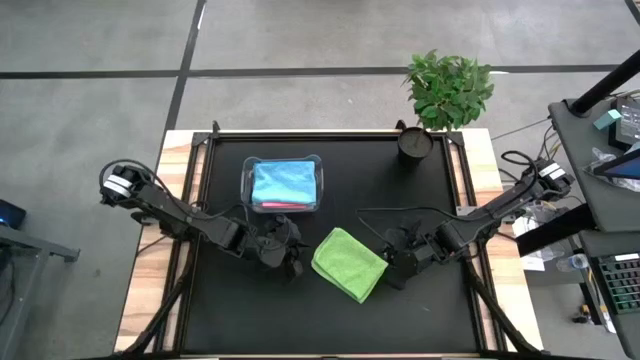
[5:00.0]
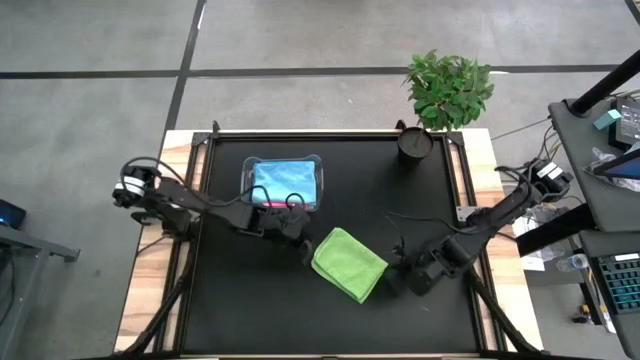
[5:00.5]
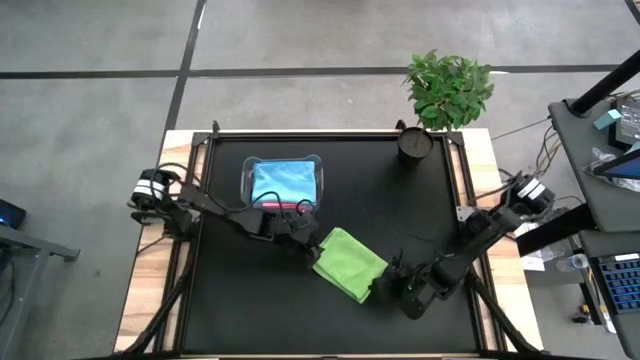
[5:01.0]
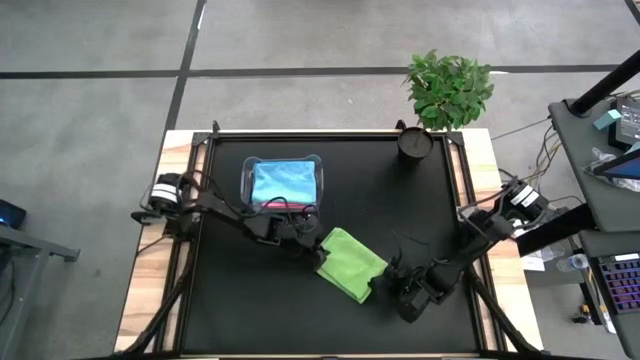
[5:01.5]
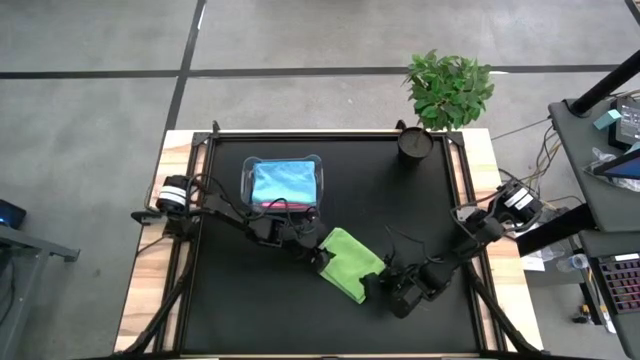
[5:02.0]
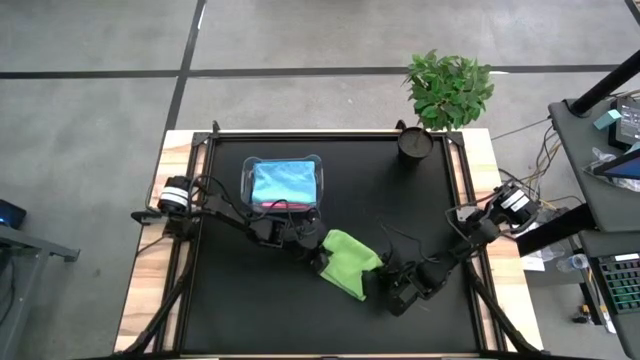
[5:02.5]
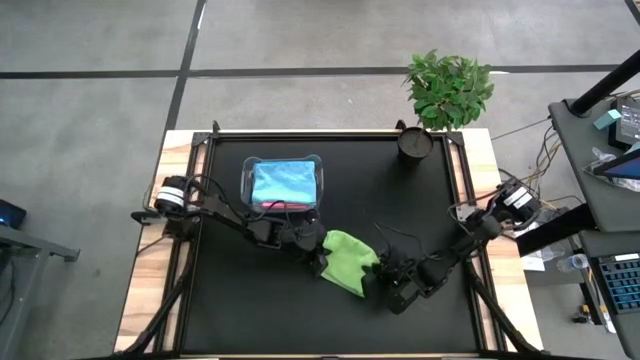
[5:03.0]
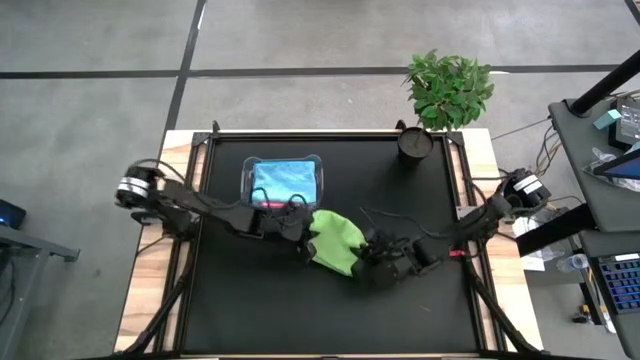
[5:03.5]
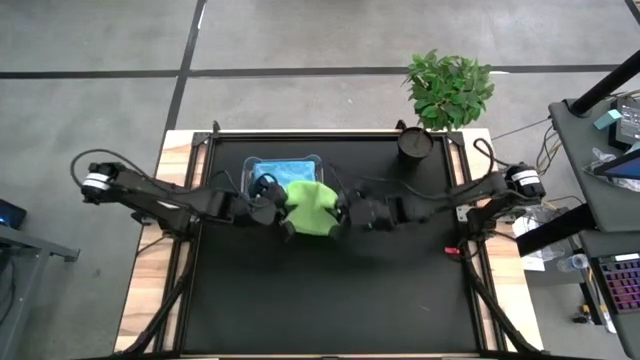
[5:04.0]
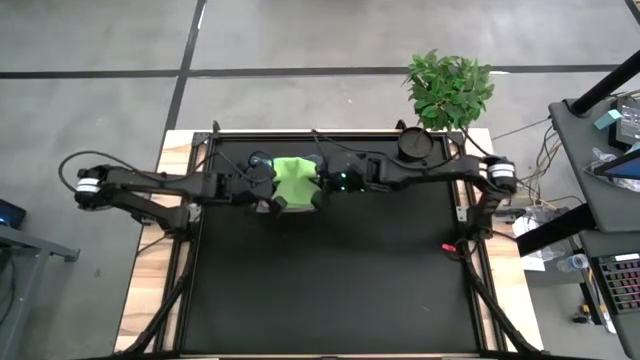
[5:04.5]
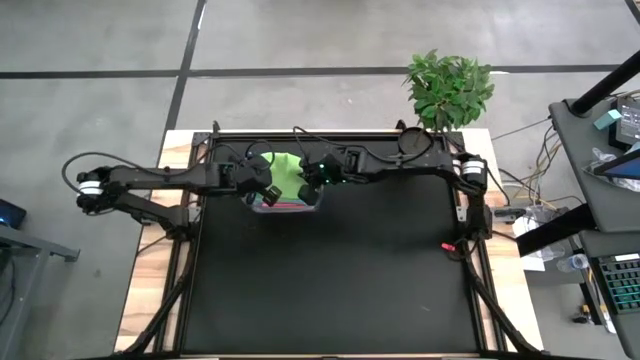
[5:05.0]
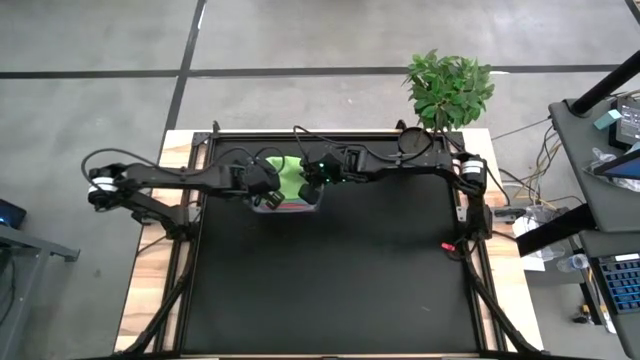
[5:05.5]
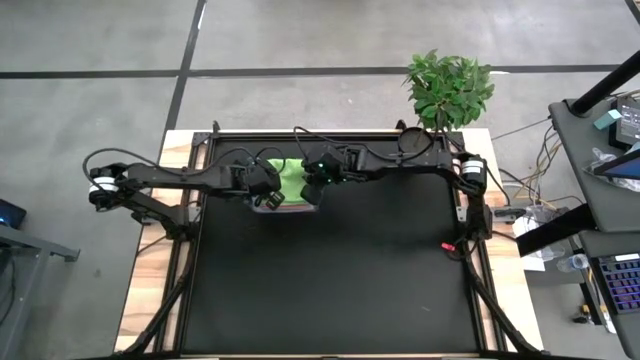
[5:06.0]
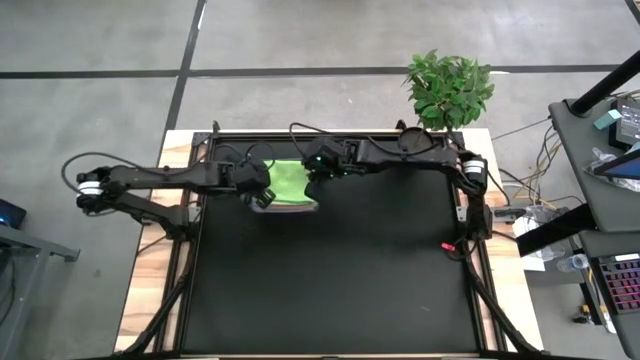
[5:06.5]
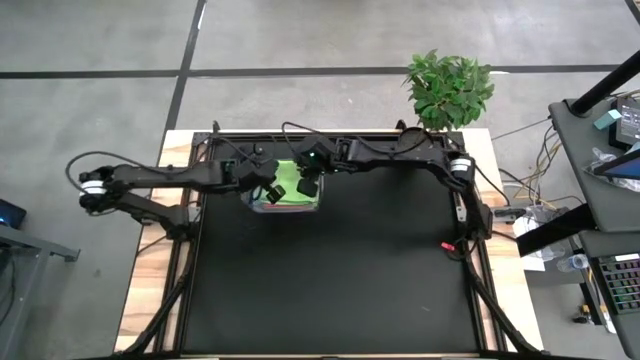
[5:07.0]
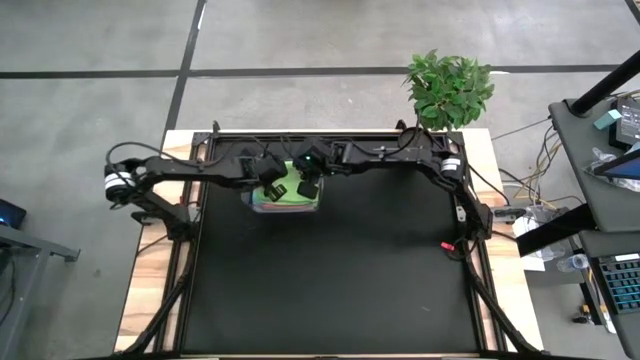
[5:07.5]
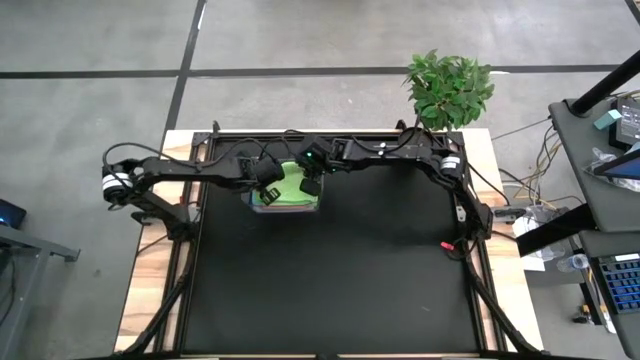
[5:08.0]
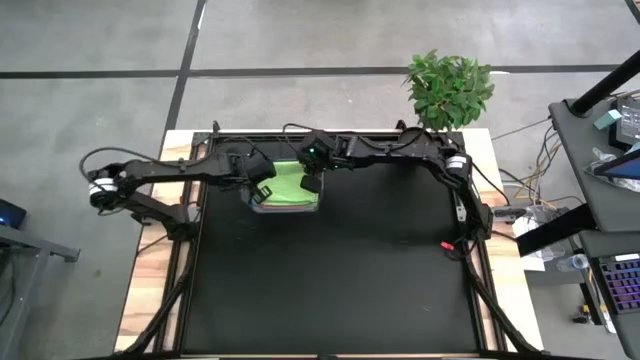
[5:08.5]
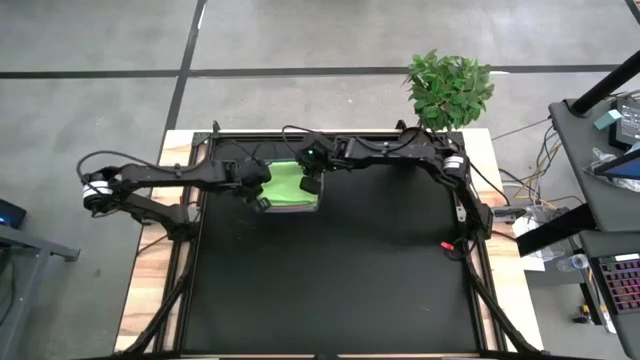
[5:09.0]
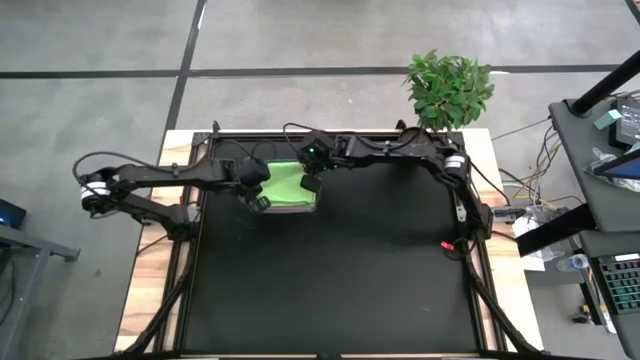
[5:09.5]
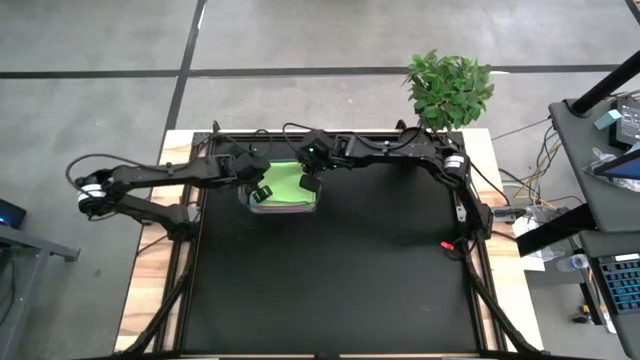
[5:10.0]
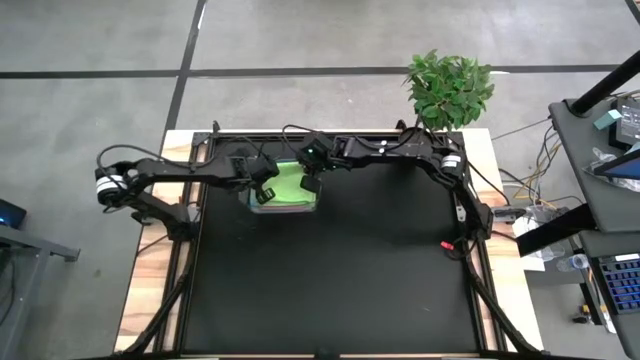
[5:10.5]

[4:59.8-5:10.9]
Task: Fold microfiber towels
Put the green microfiber cloth into the transparent bin

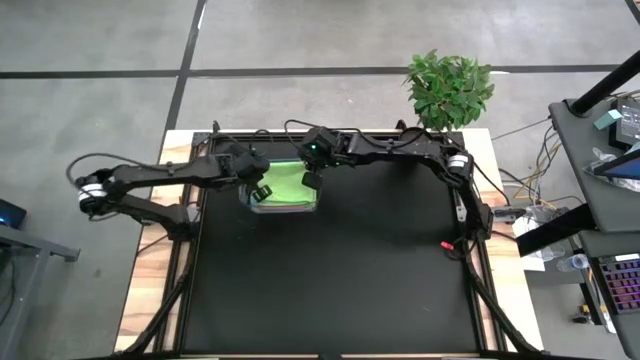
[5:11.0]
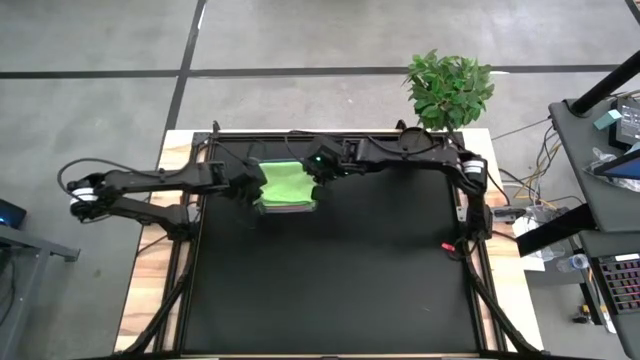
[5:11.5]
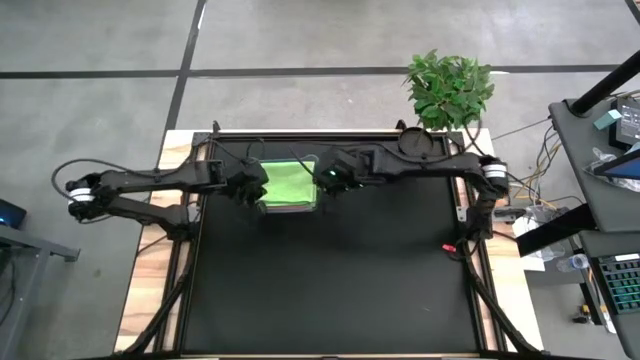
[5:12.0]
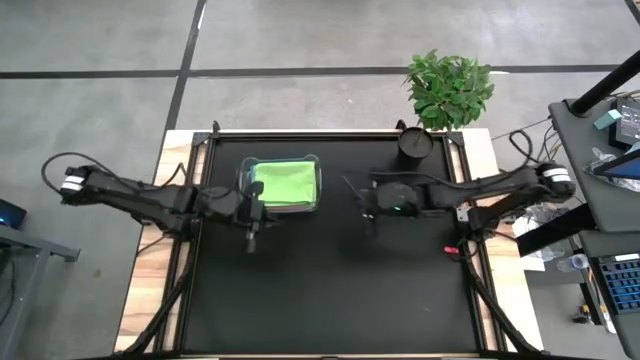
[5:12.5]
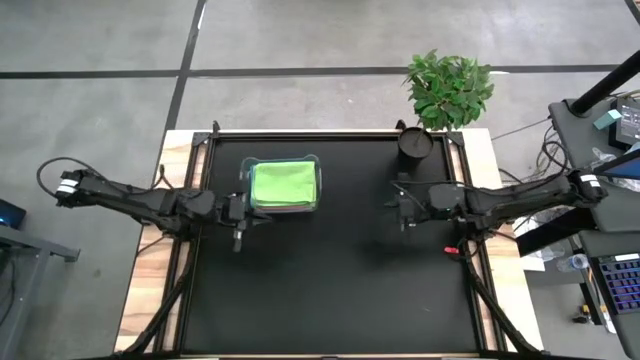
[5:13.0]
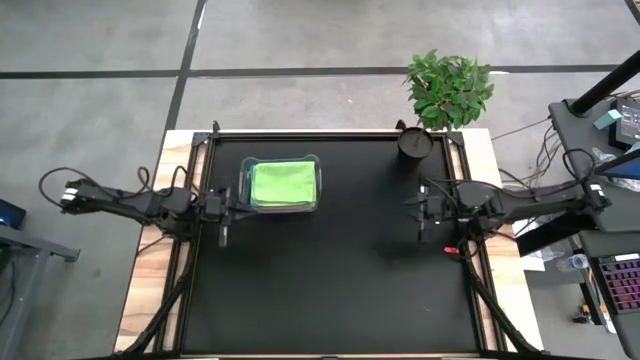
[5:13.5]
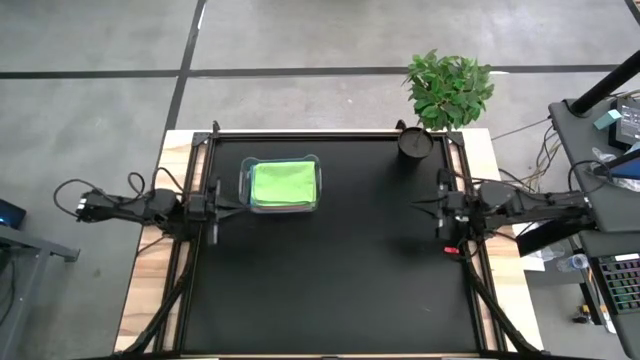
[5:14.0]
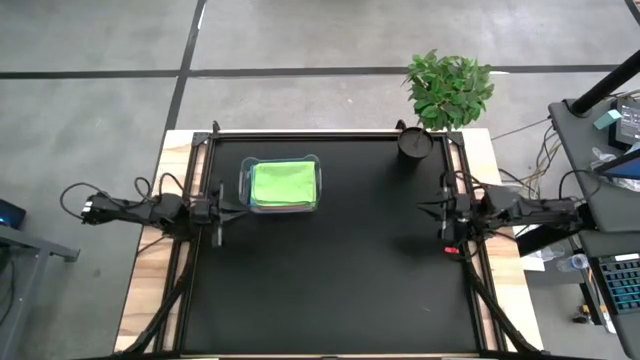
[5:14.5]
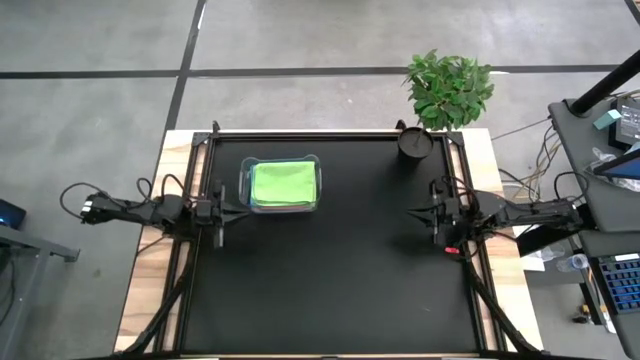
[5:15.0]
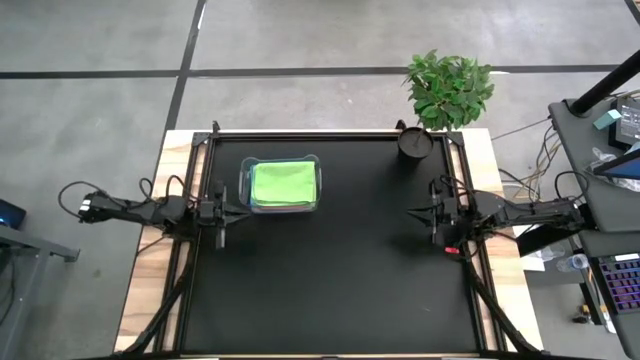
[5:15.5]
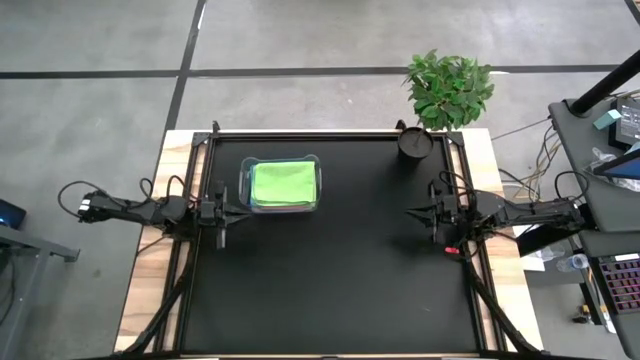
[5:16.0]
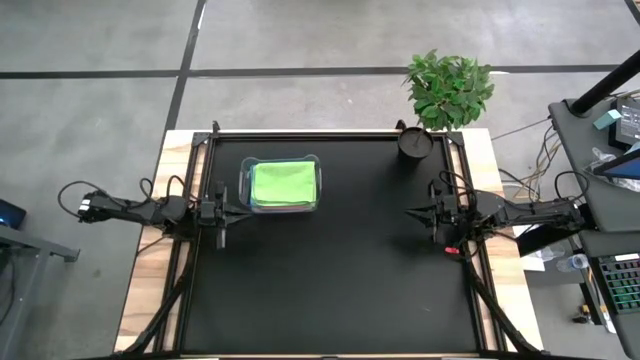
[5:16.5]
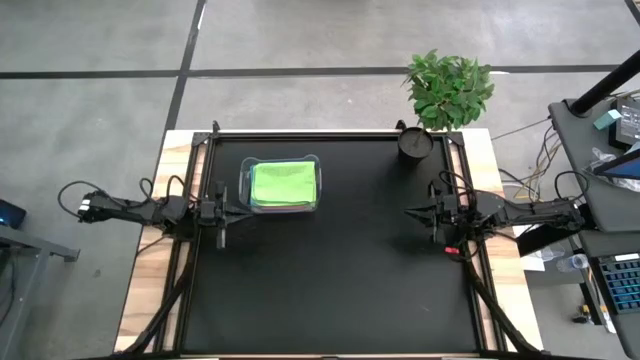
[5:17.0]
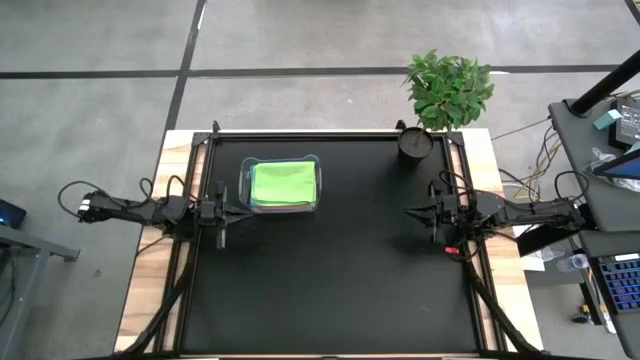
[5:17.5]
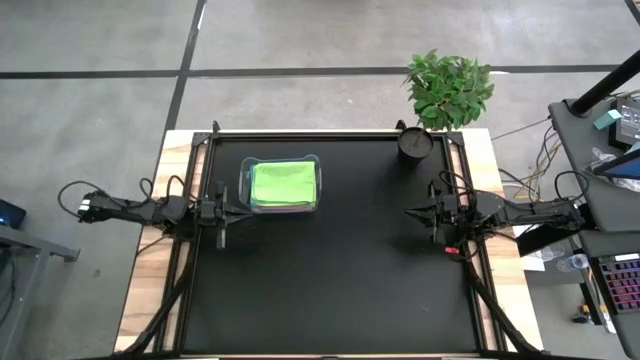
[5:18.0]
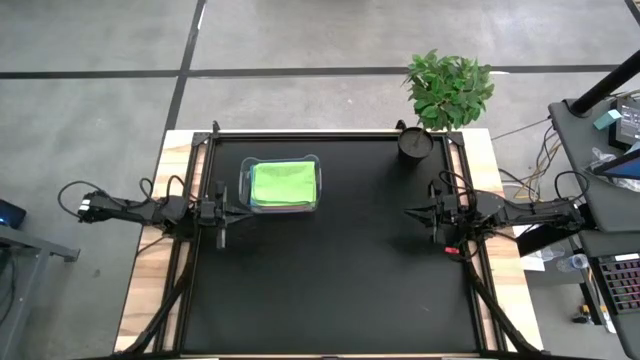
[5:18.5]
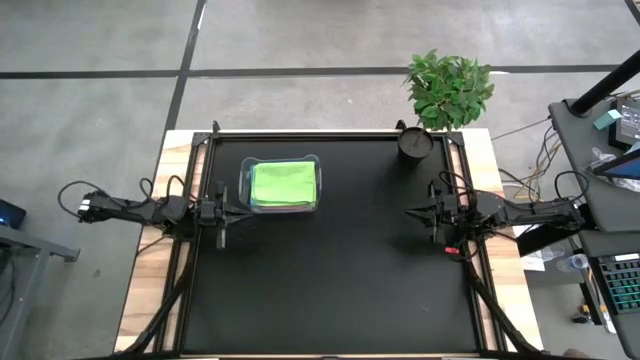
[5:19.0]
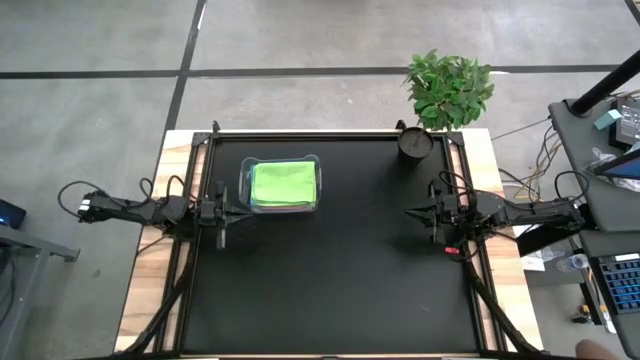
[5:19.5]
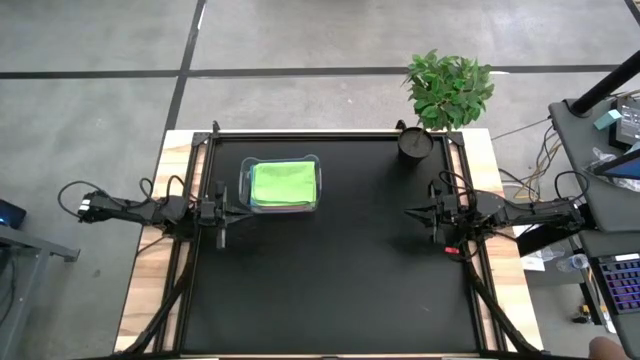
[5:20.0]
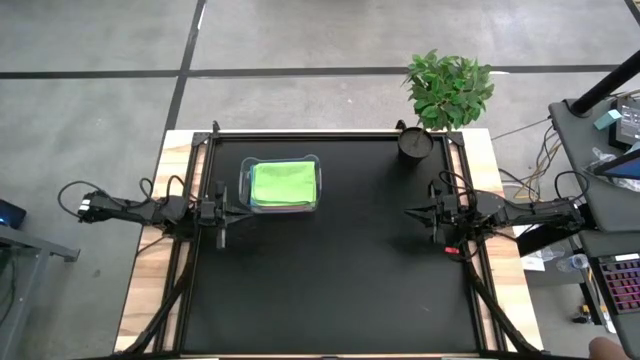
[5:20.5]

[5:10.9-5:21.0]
Return to Home Position

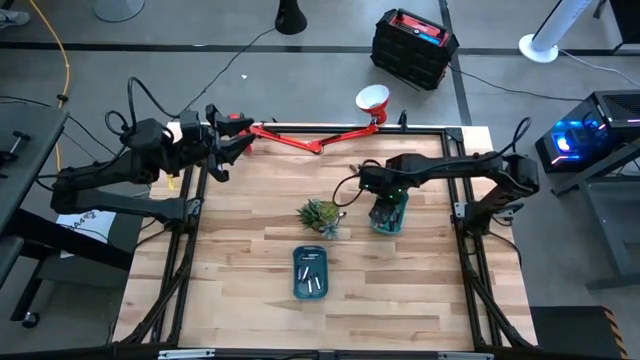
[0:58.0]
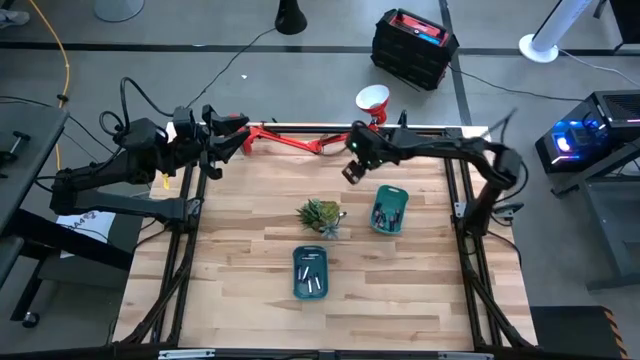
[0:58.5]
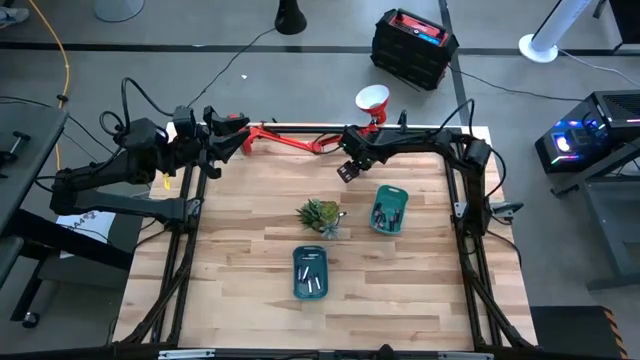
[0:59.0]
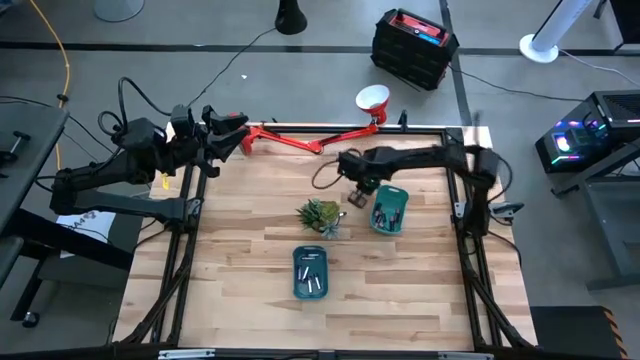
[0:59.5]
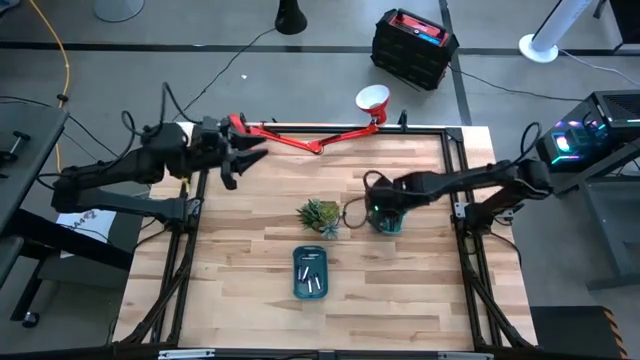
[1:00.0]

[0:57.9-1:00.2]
Task: Sort batteries
Put the black battery into the green bin
